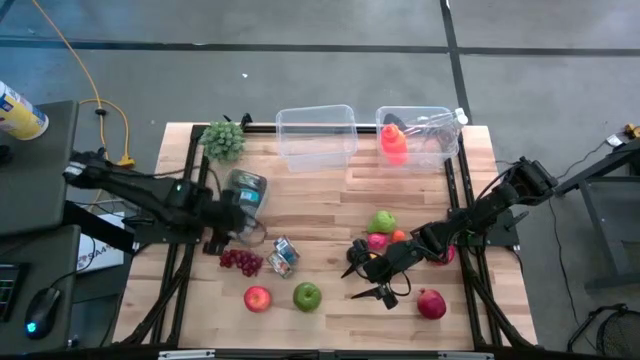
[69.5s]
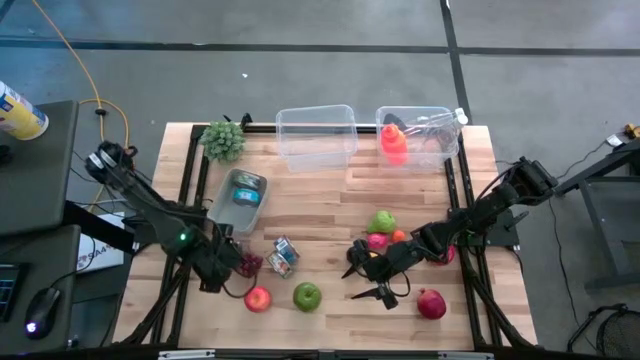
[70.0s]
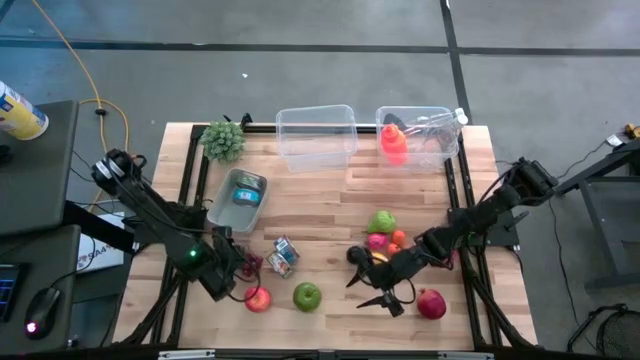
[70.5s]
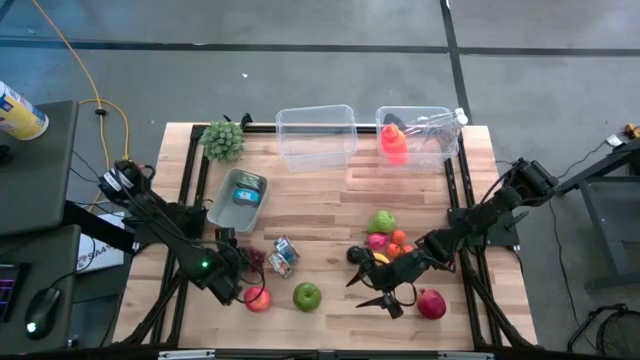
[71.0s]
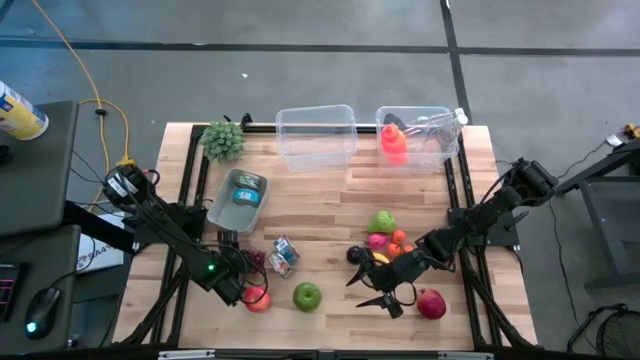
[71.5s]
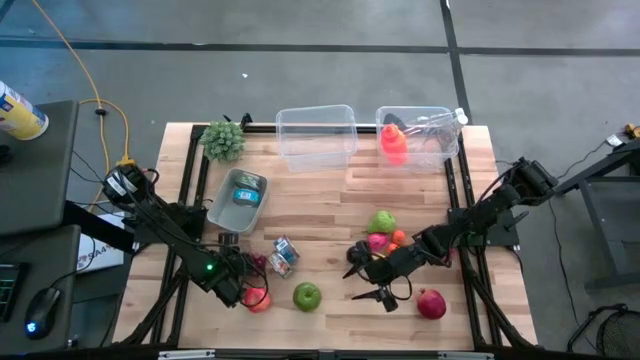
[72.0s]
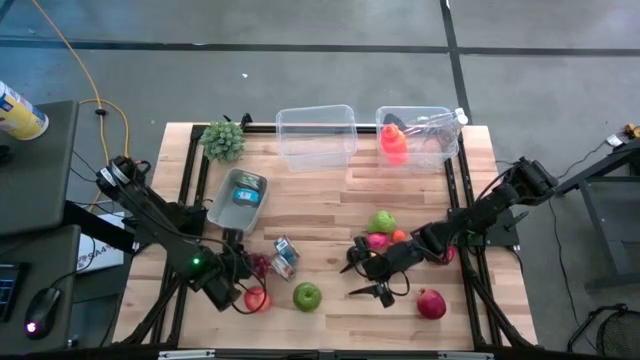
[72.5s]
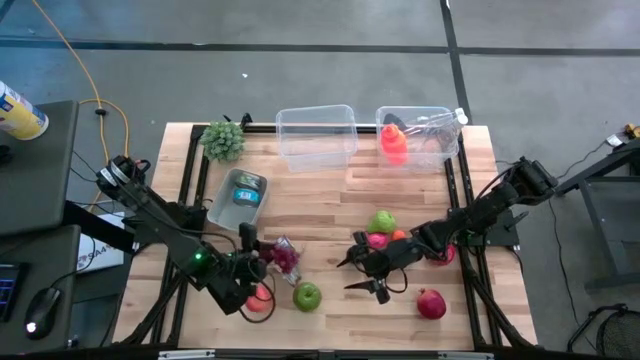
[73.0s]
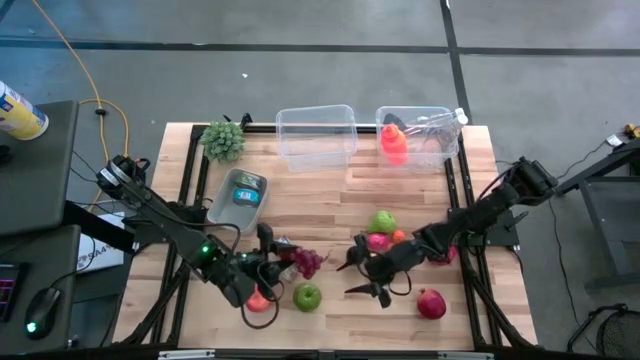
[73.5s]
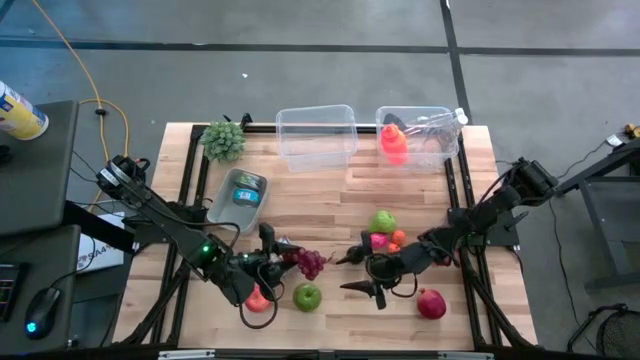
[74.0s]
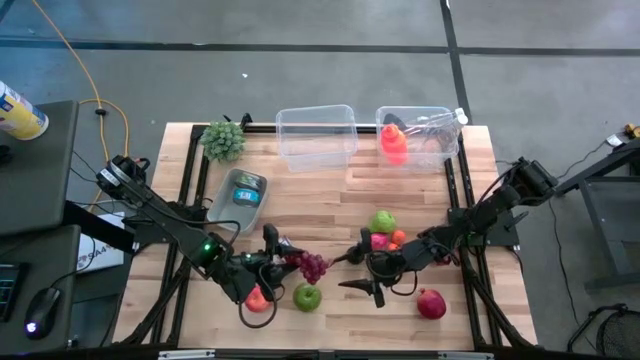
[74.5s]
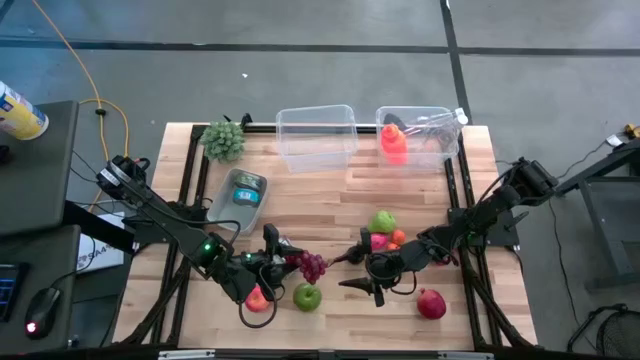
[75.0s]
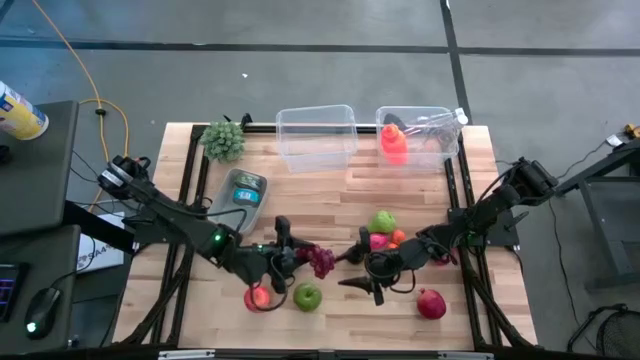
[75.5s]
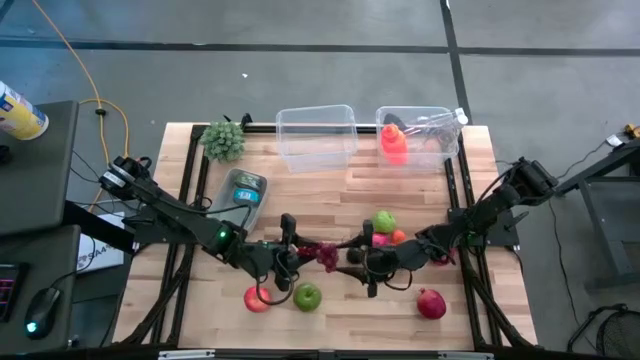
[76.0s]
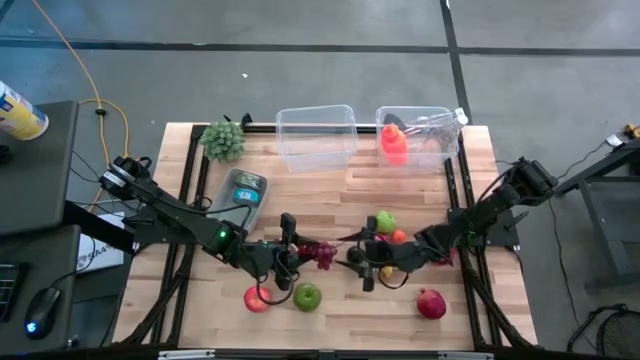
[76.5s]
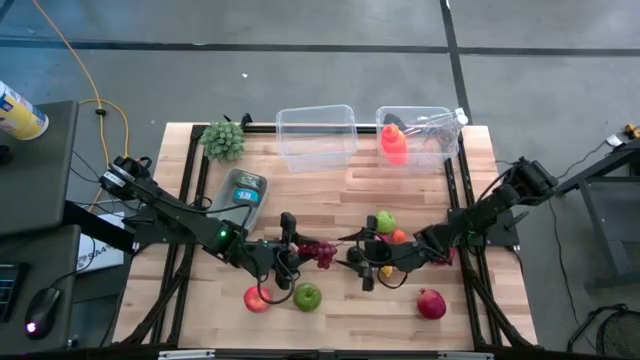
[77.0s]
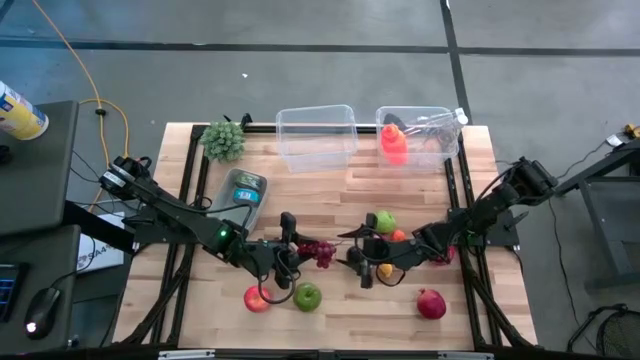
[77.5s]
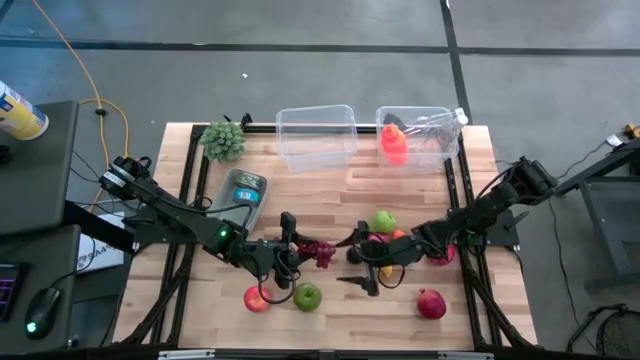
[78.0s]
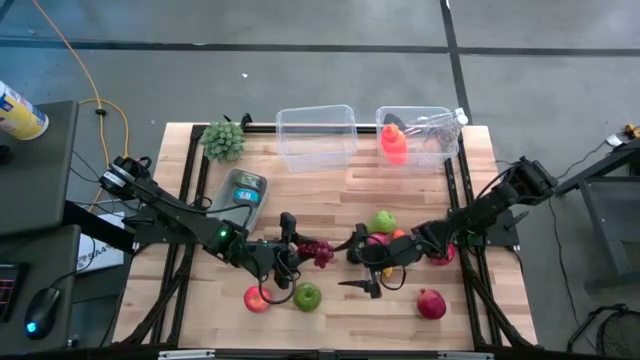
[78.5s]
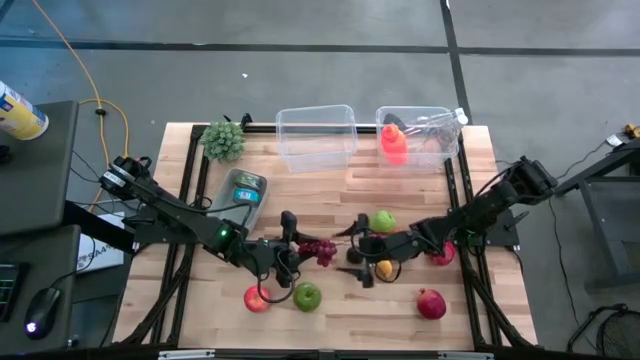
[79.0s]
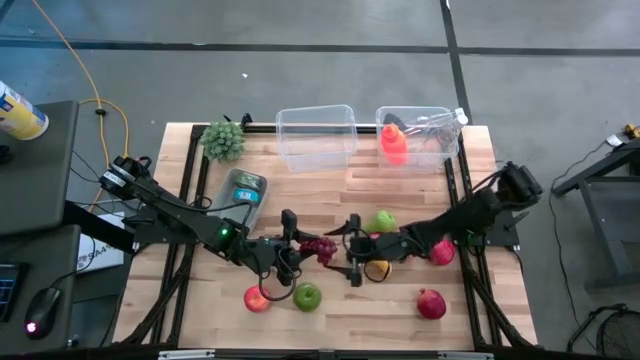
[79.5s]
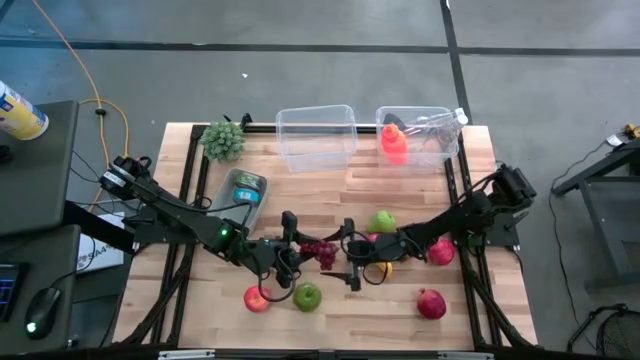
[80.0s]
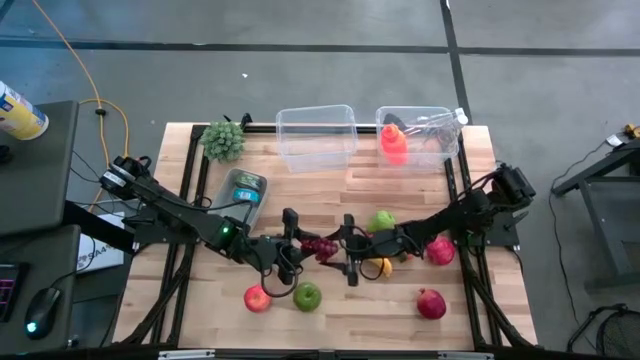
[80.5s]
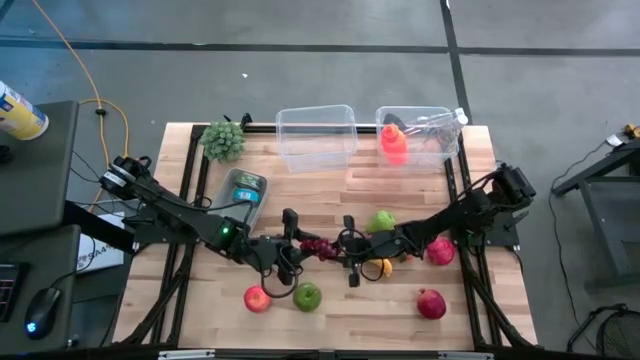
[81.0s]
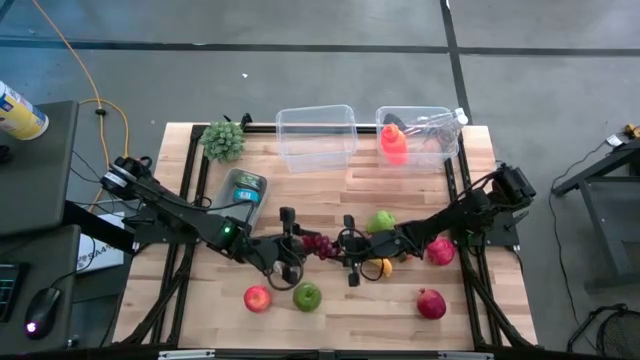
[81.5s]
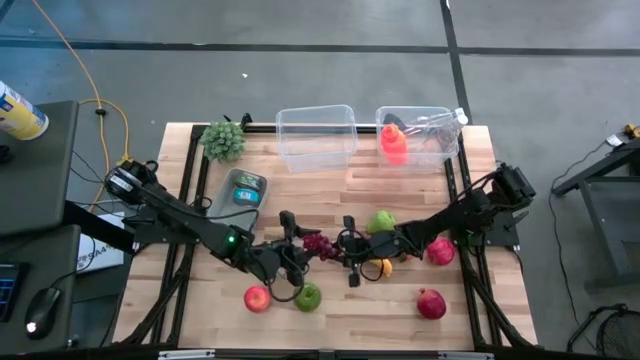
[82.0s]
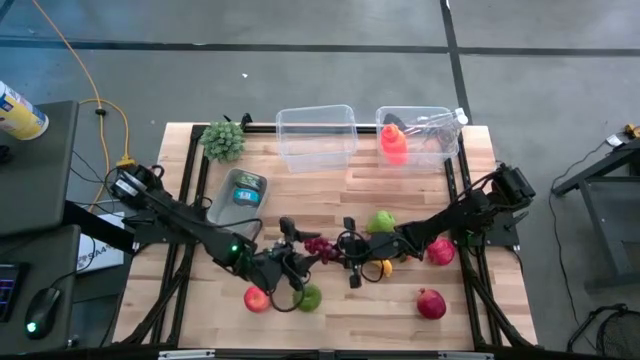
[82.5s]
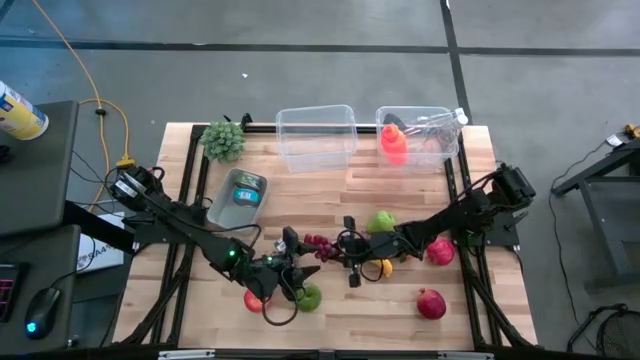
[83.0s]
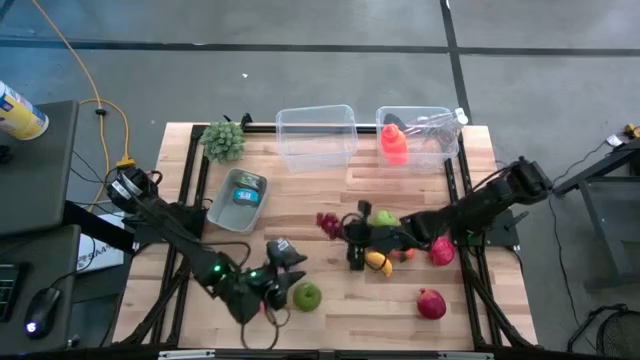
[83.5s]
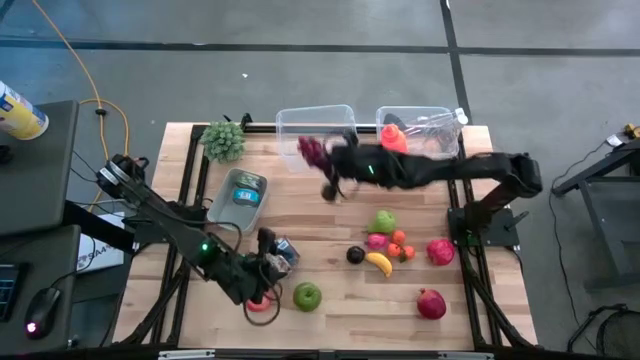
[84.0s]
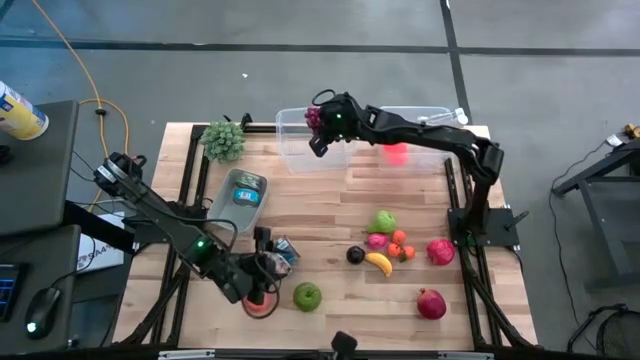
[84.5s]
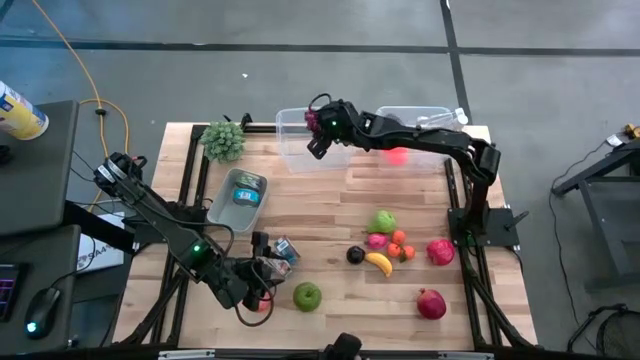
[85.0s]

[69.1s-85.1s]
Task: Pick & Place Food Item
Put the red grapes into the left transparent bin

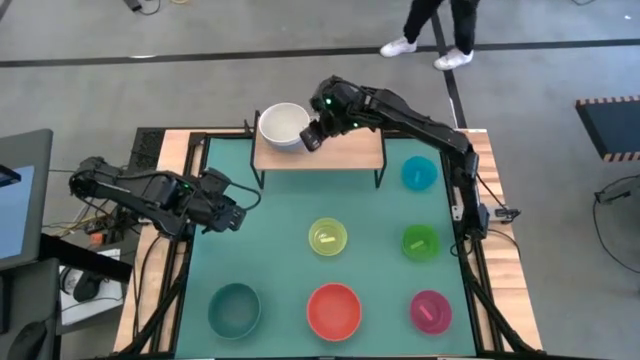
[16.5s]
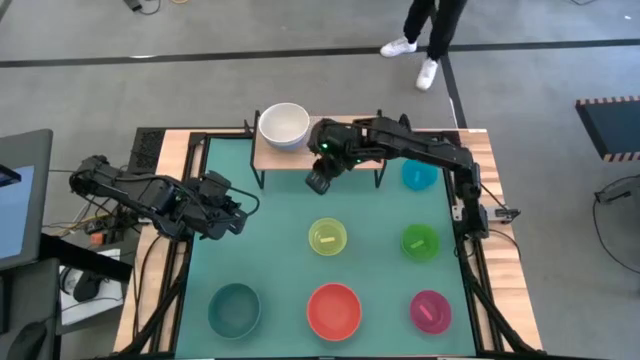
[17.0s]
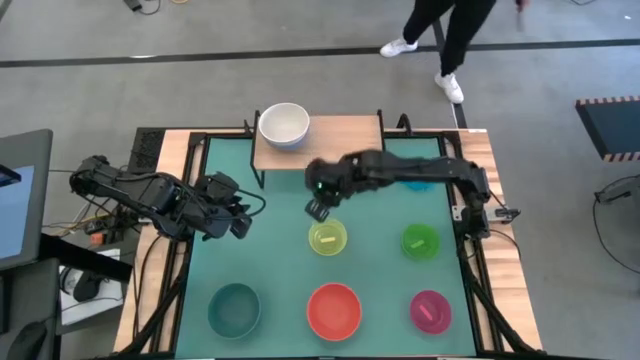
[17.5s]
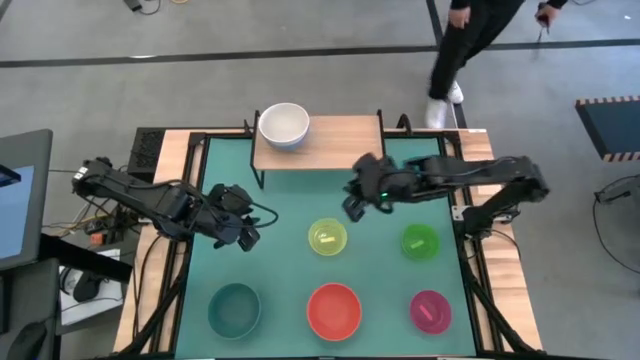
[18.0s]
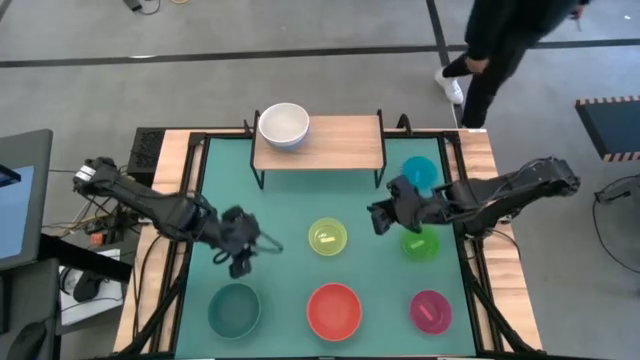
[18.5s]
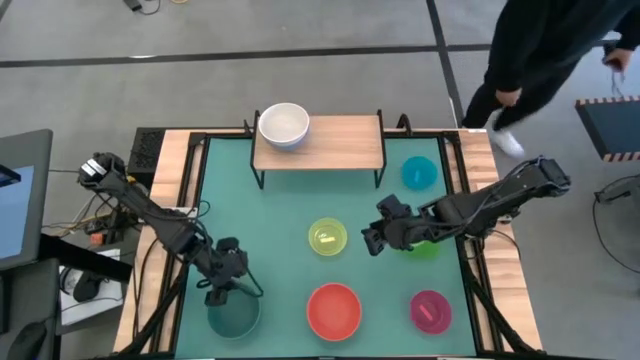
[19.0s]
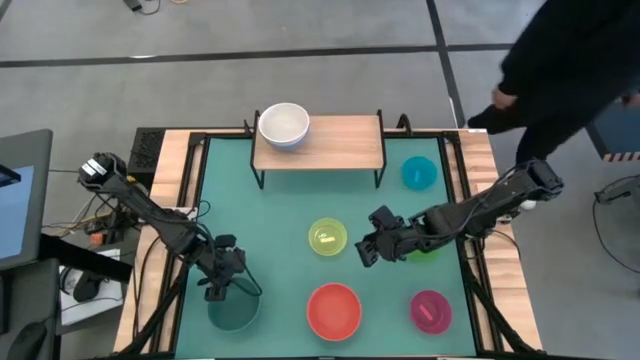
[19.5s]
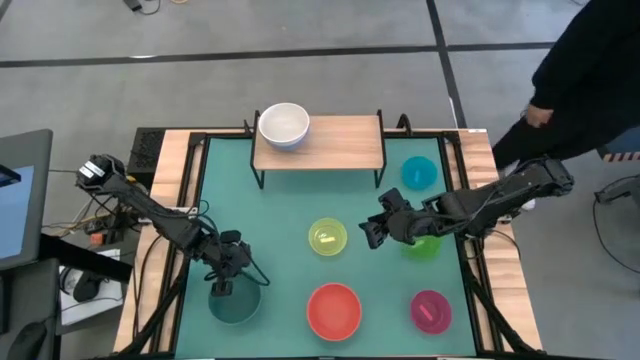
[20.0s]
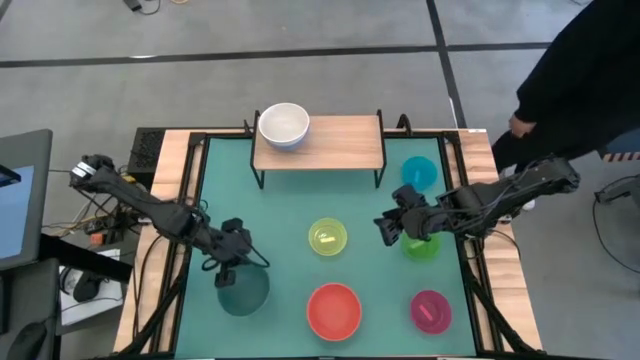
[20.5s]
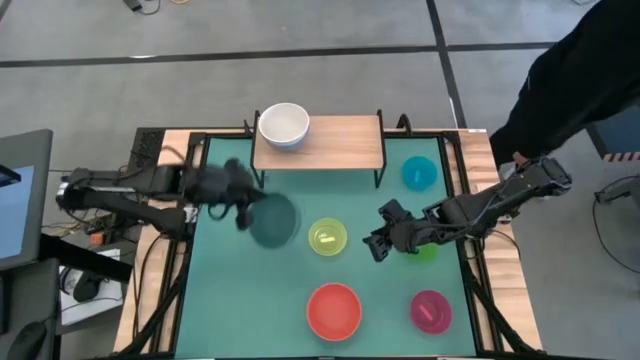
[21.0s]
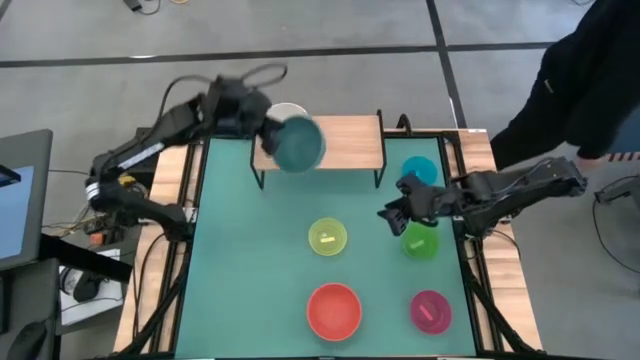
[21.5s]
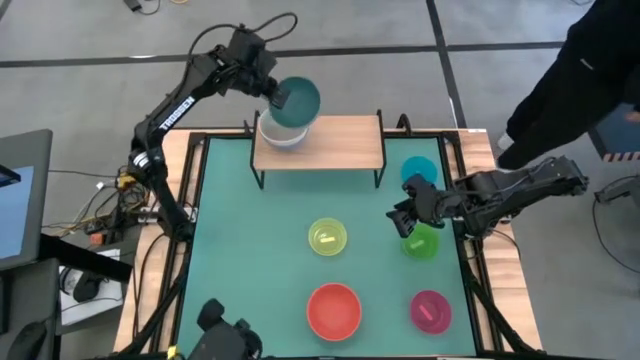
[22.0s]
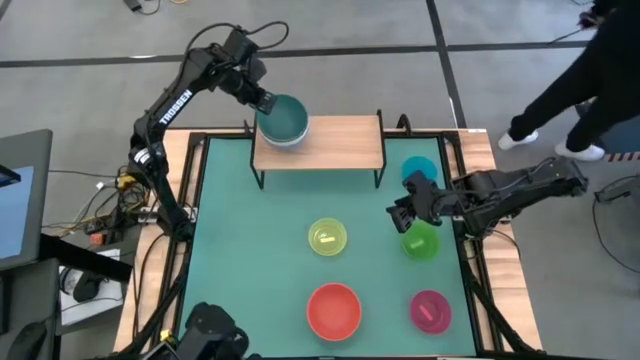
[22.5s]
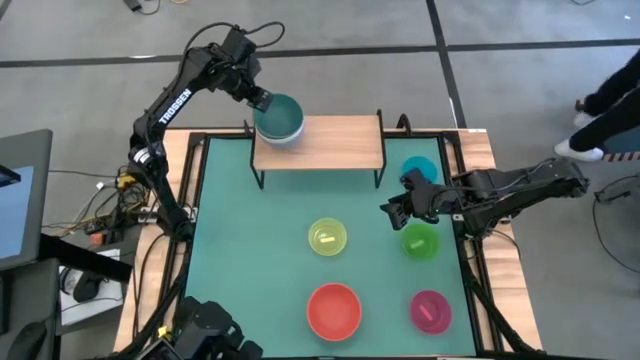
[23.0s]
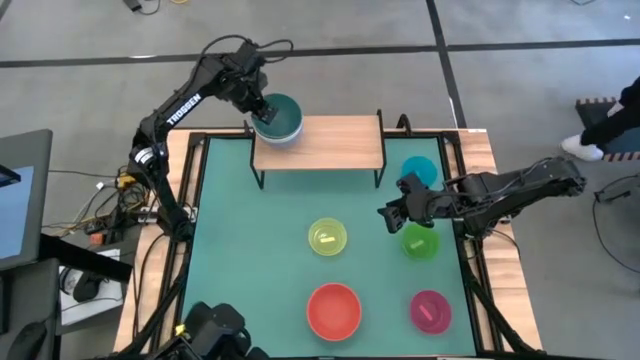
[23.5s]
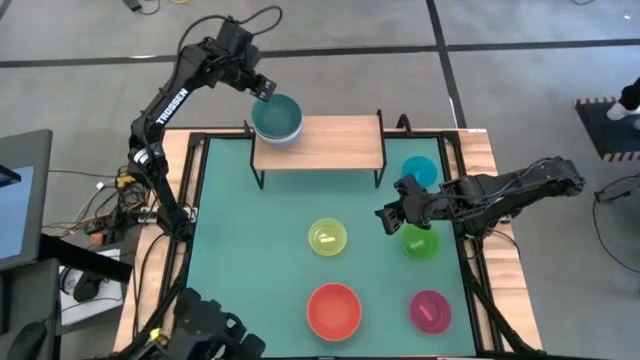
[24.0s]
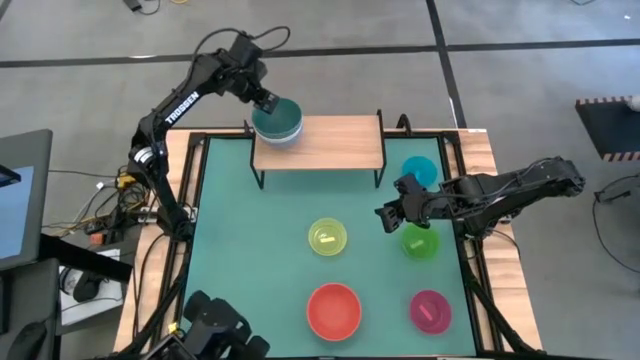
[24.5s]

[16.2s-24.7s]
Task: Place and stack bowls onto a shelf
Stack the green bowl on top of the white bowl on the shelf
